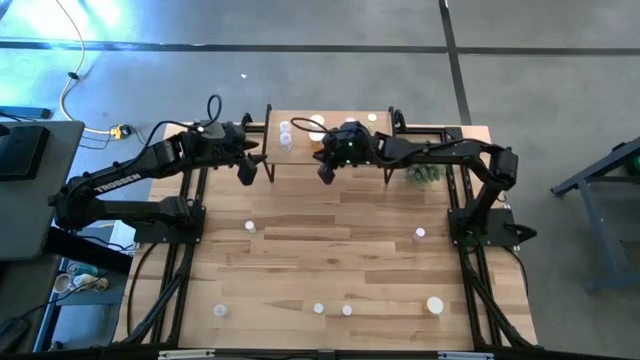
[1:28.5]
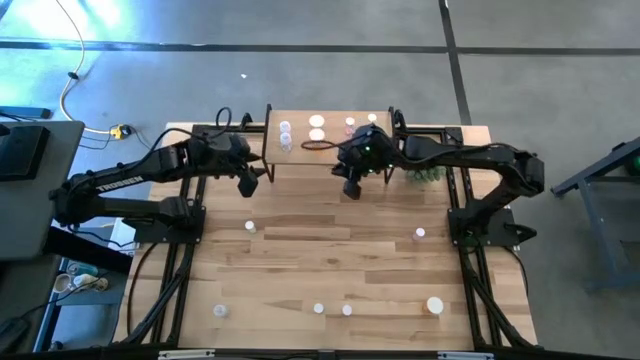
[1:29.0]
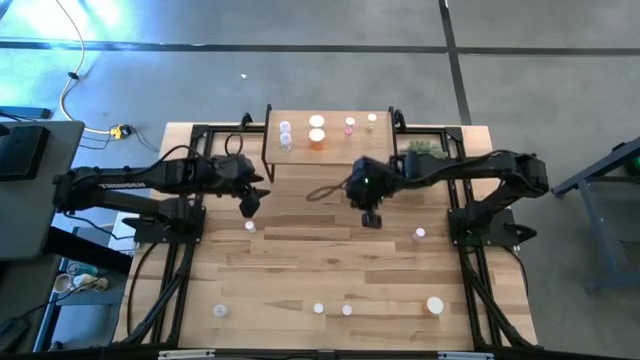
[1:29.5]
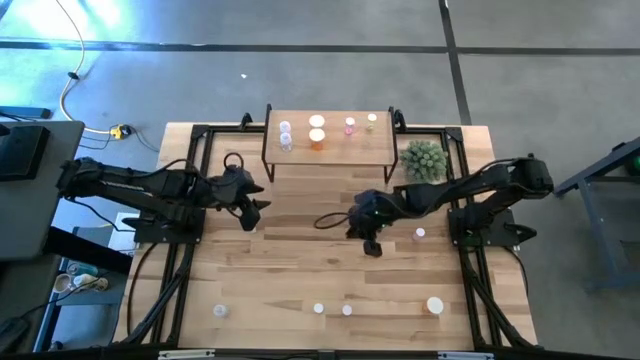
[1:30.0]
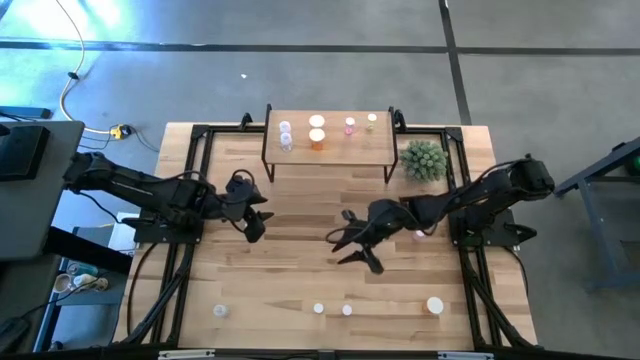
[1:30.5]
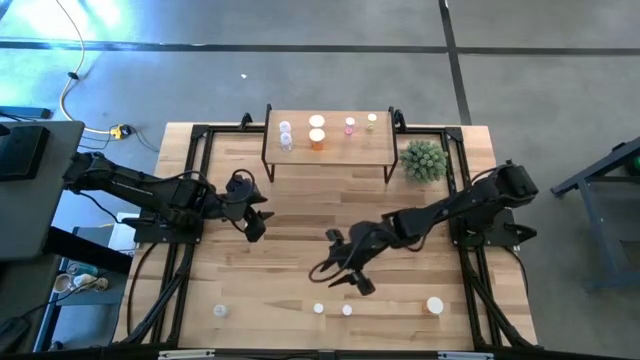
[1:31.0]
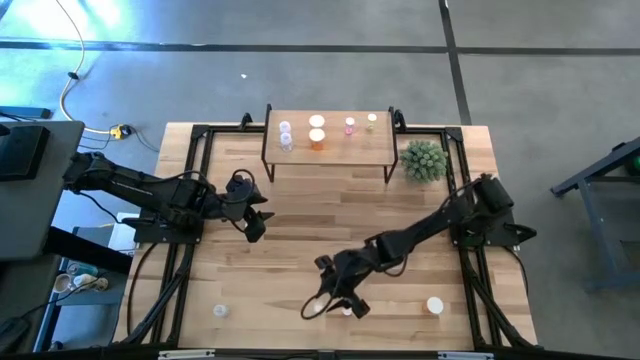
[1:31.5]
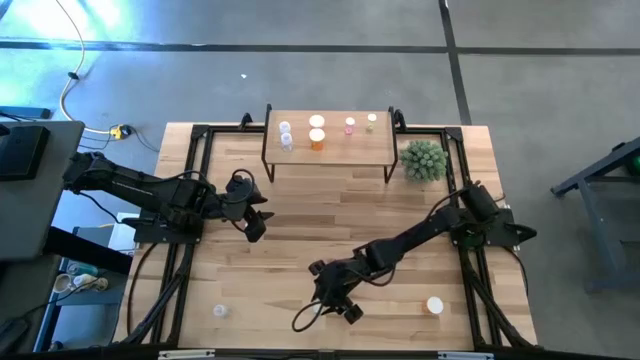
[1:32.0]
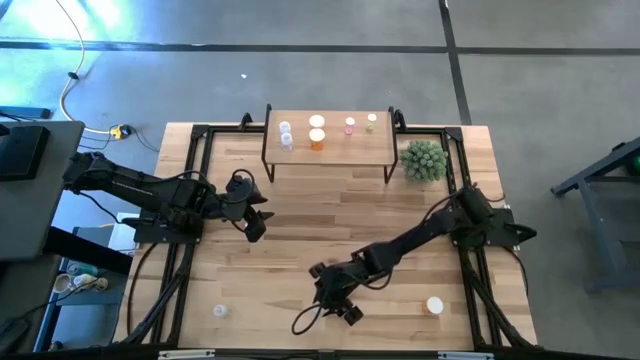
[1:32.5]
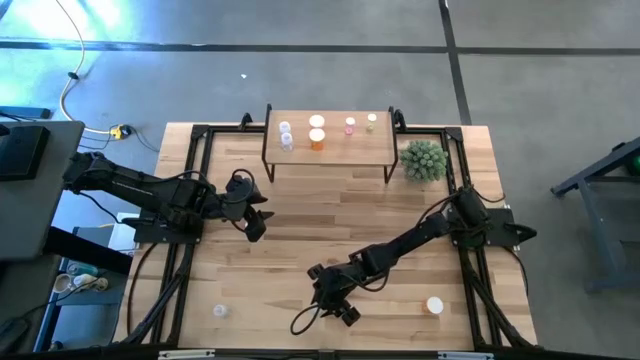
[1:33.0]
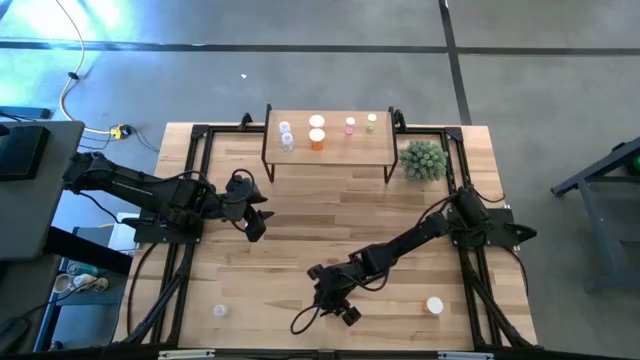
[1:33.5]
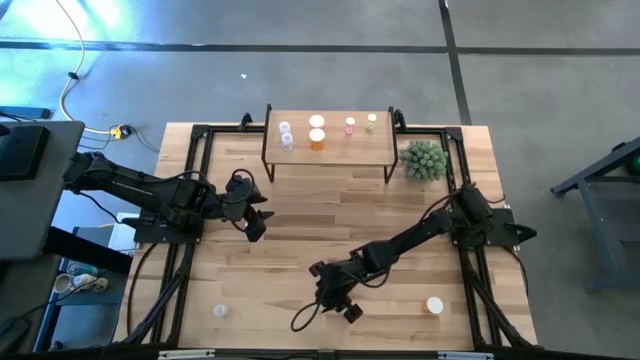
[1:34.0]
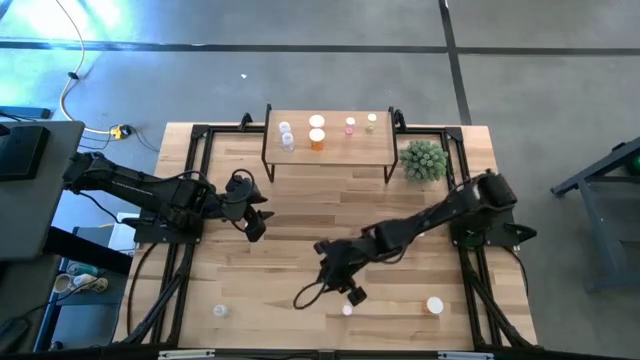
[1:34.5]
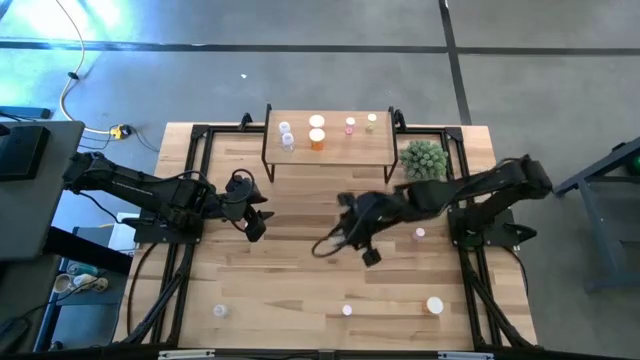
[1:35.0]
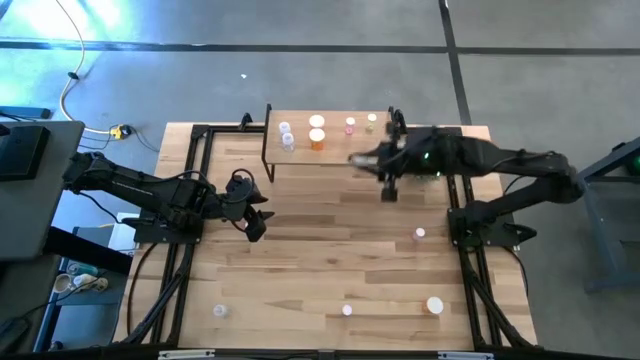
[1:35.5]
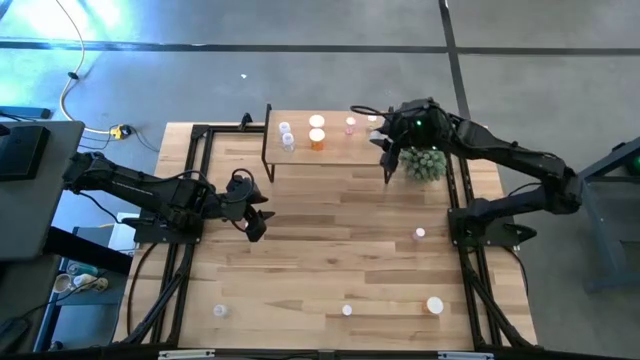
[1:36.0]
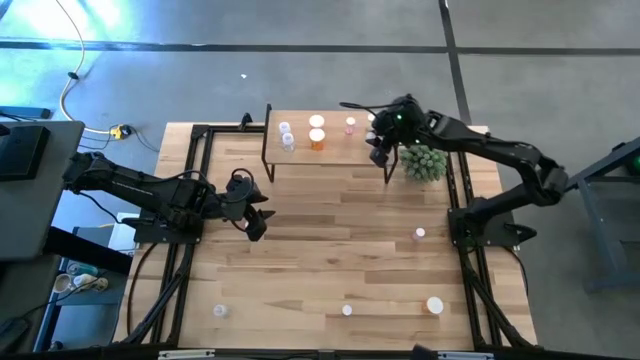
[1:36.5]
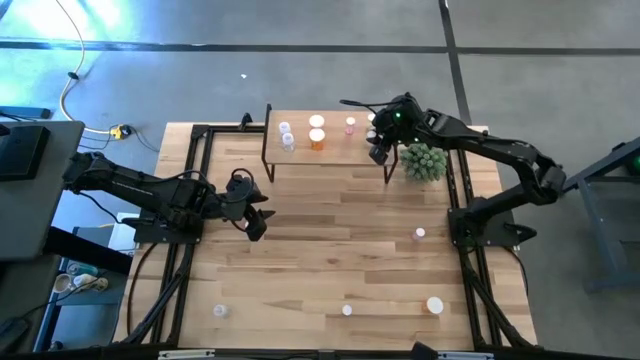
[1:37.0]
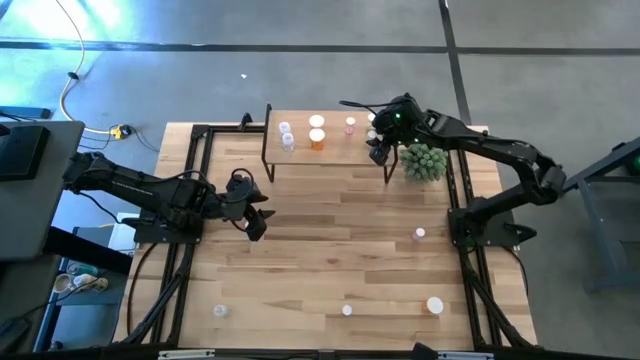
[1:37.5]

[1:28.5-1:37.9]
Task: Pick and place medicine bottles onto shelf by color
Put the bottom yellow pill bottle aligned with the other yellow pill bottle on the shelf

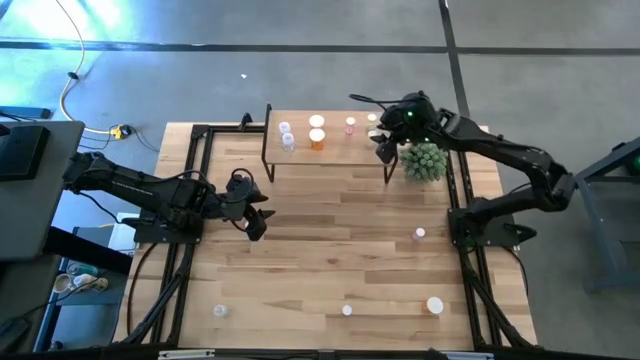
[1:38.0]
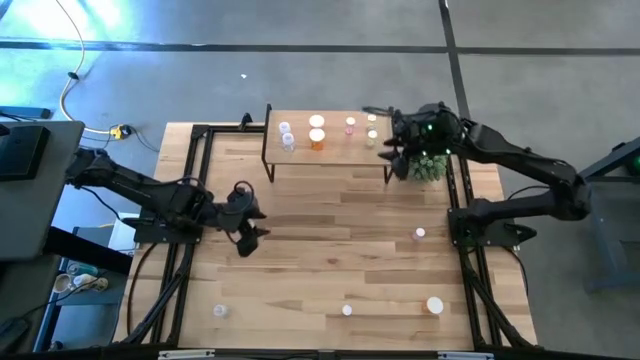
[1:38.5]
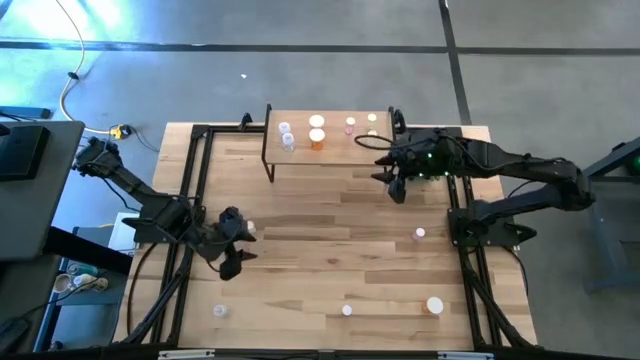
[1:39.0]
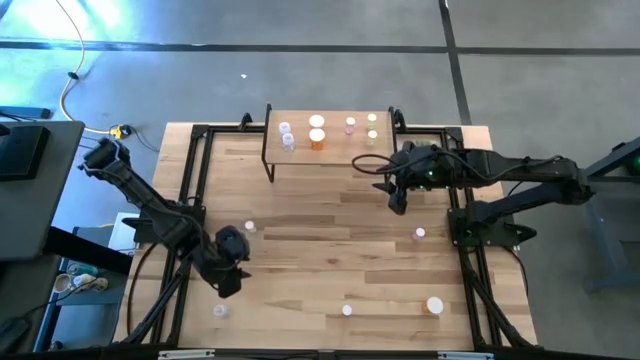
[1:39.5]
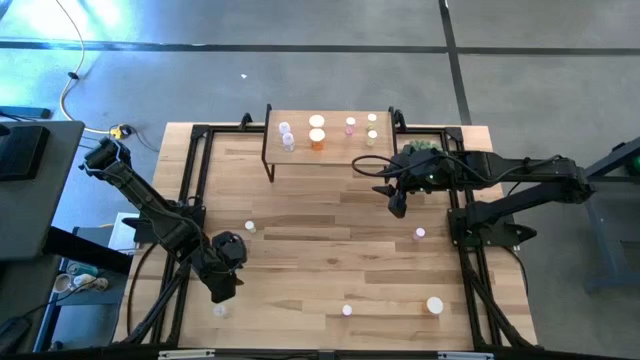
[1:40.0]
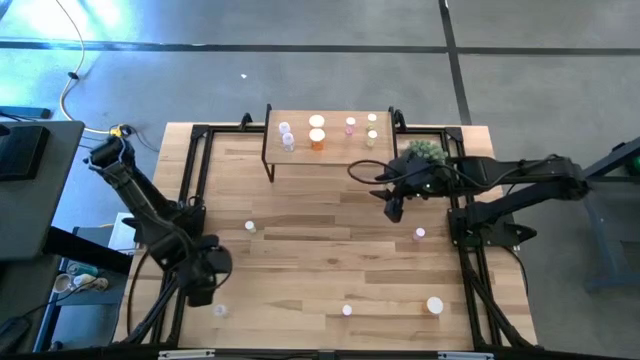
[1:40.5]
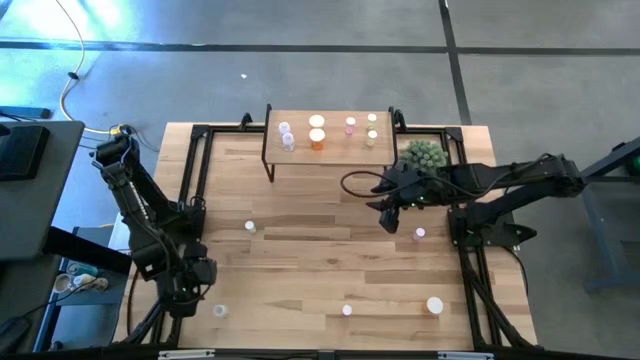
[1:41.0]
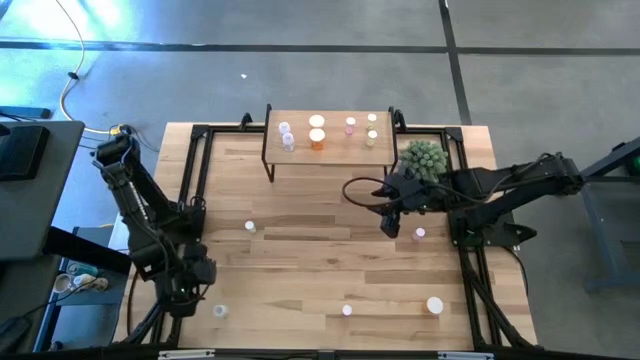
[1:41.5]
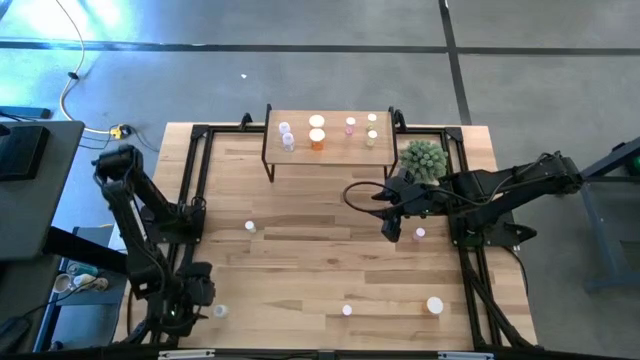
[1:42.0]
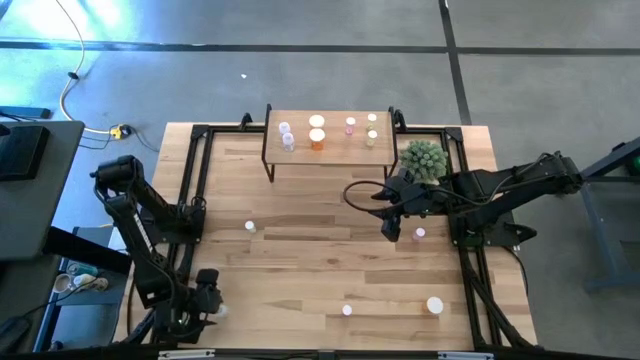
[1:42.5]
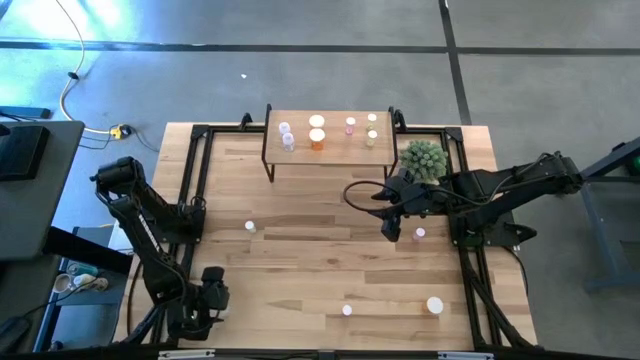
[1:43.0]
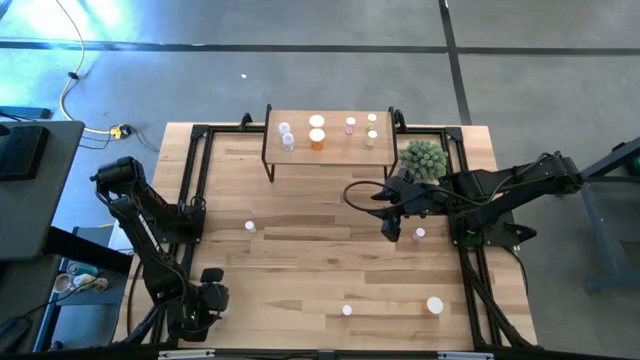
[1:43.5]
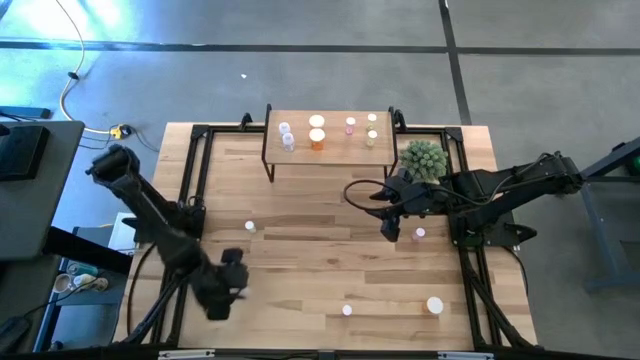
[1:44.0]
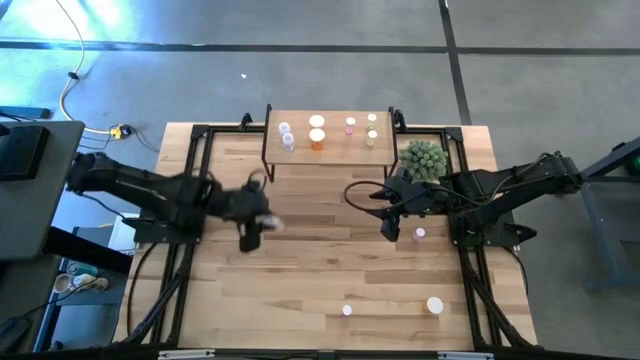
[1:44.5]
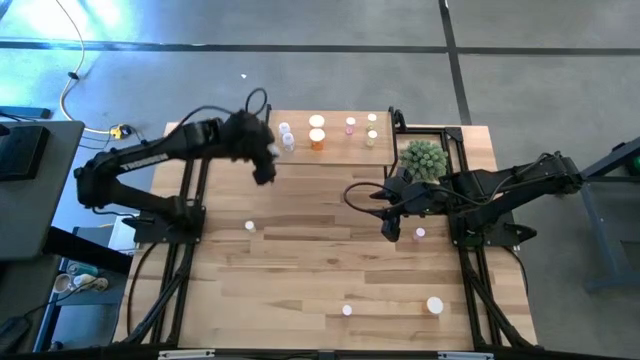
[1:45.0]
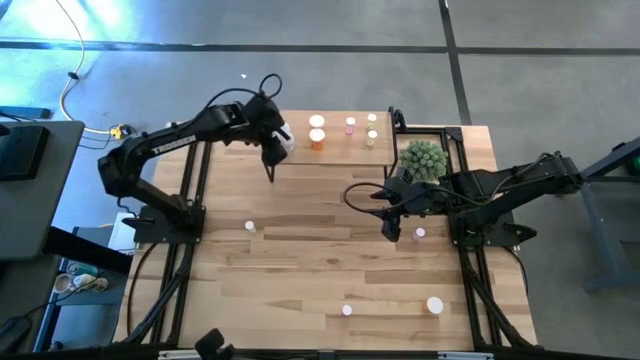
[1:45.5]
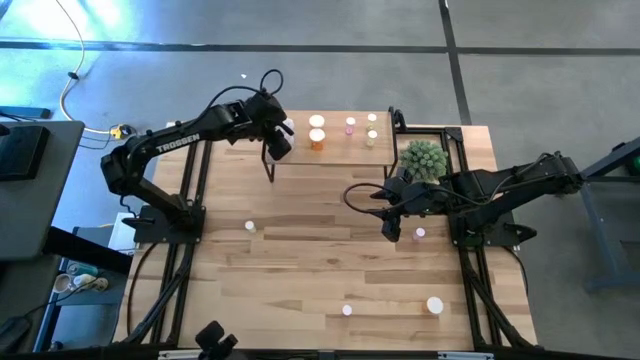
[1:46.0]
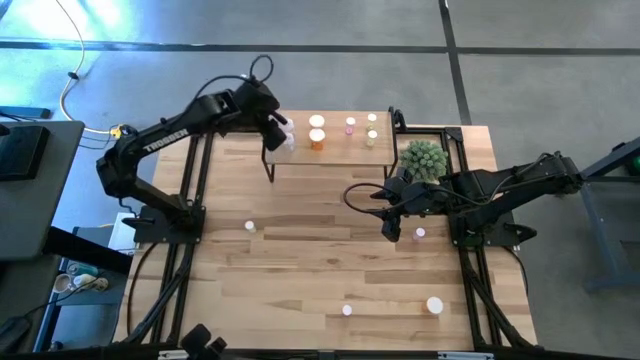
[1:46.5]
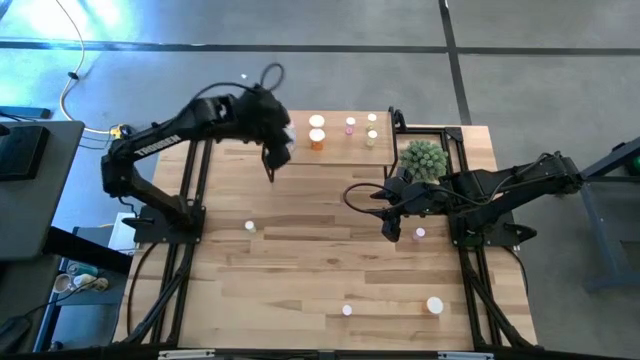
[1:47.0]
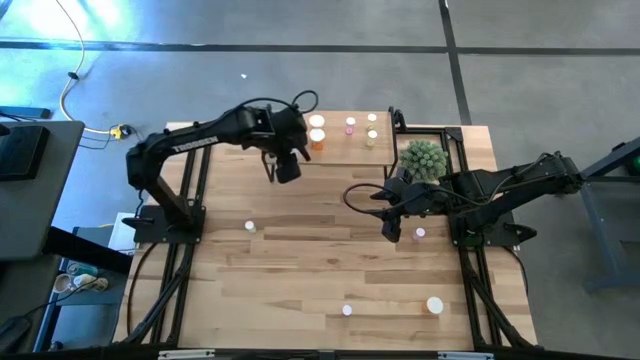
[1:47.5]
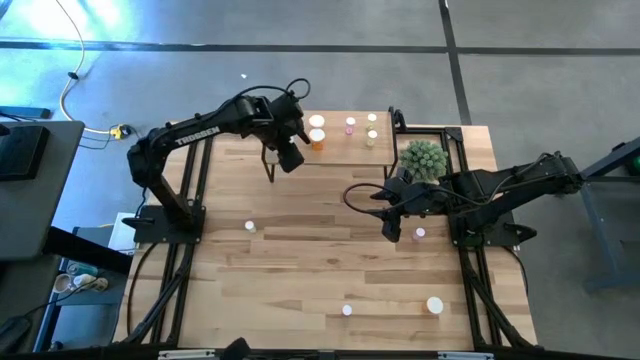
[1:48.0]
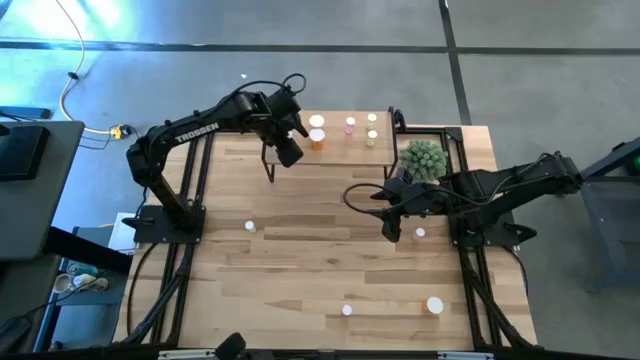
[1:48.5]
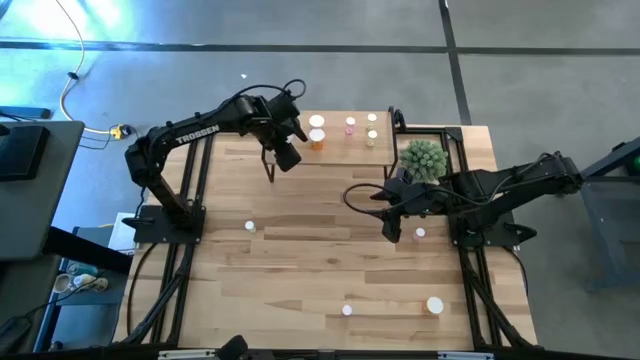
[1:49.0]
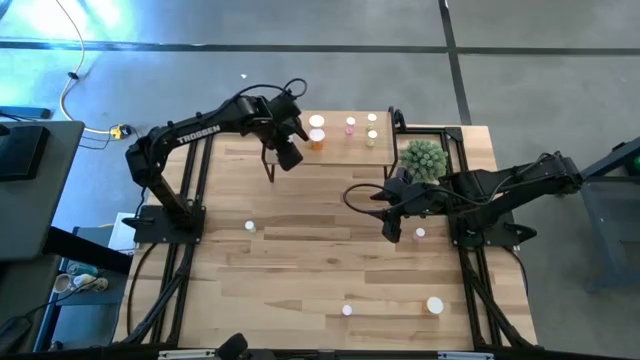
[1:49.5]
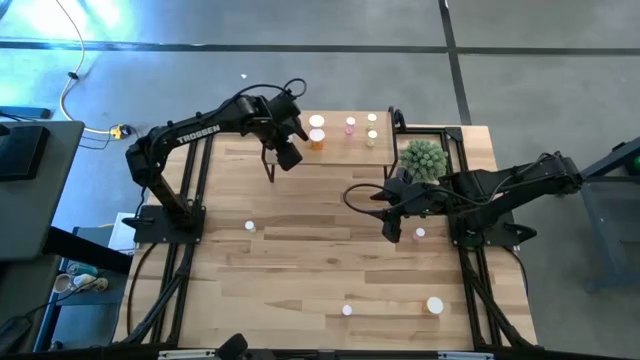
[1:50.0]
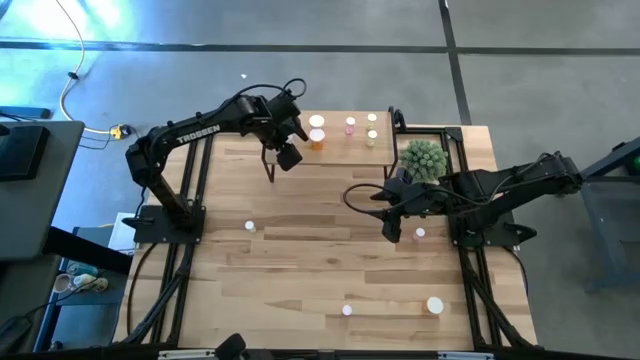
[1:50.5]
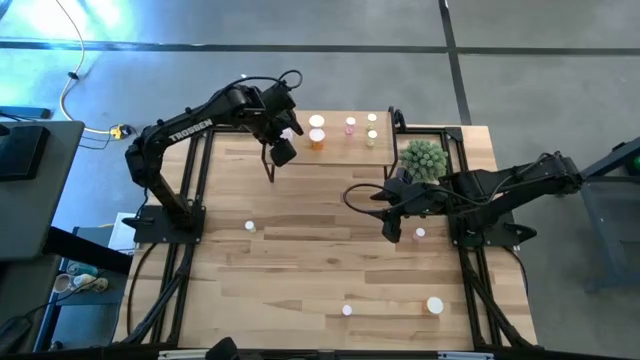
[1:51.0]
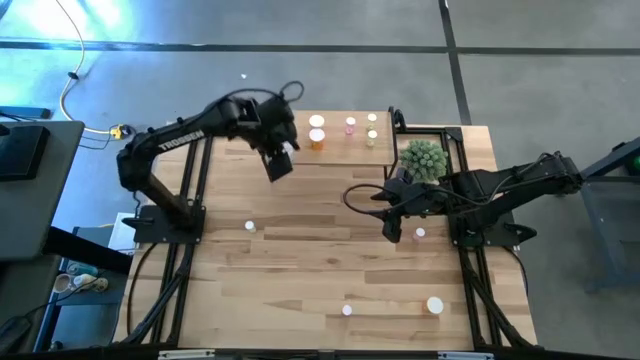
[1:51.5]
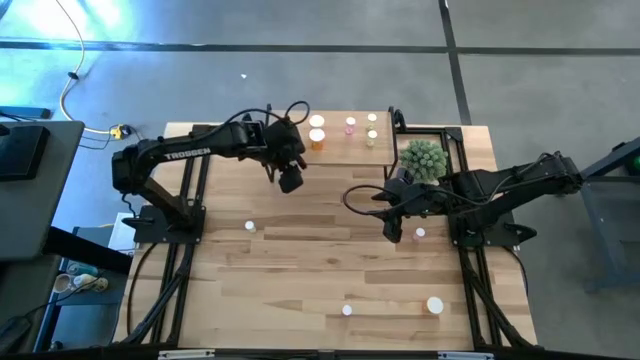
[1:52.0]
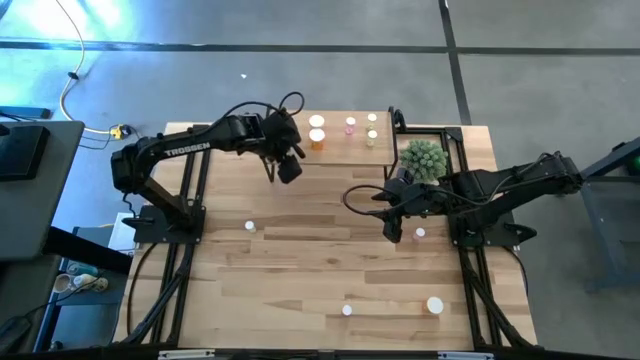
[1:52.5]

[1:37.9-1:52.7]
Put the transparent pill bottle aligned with the other transparent pill bottles on the shelf
